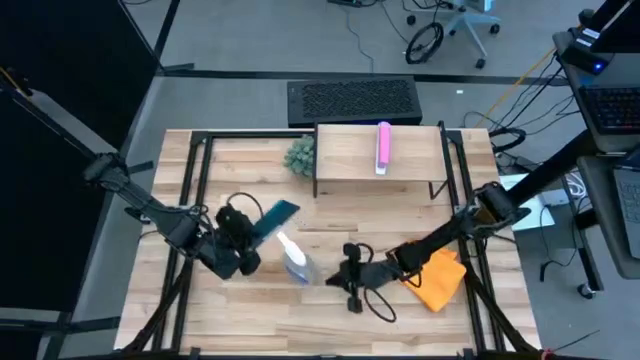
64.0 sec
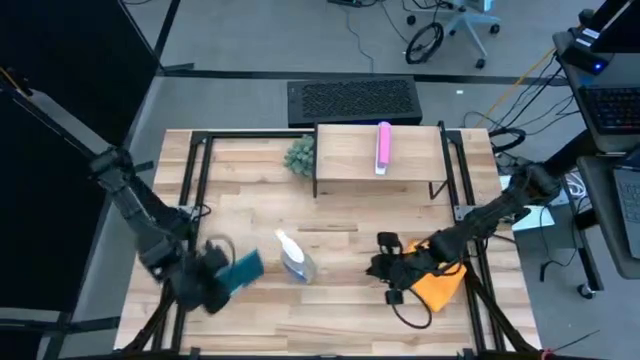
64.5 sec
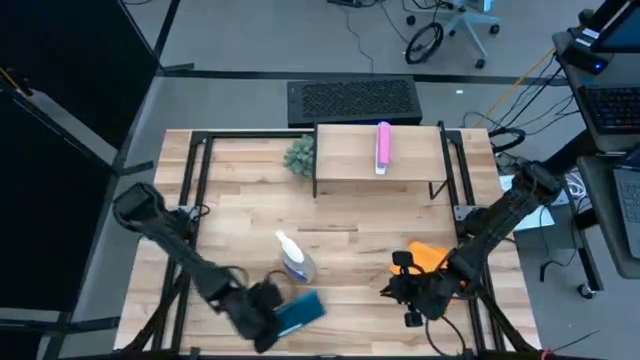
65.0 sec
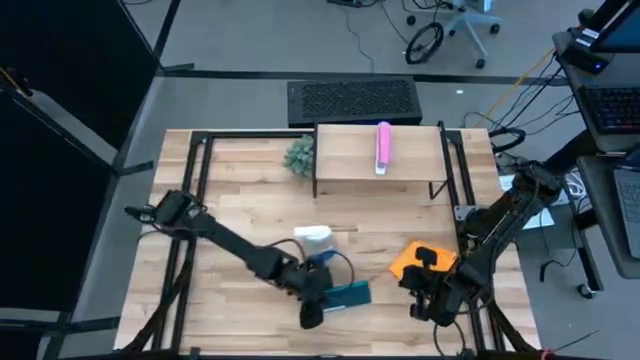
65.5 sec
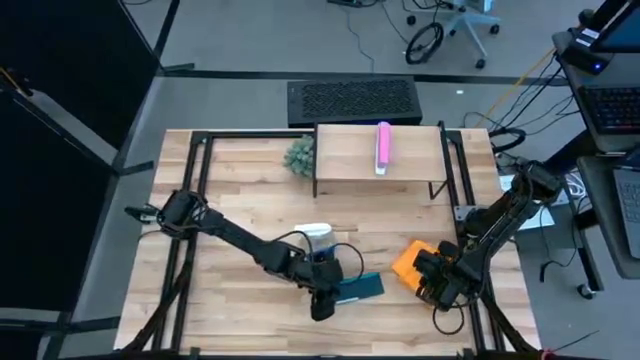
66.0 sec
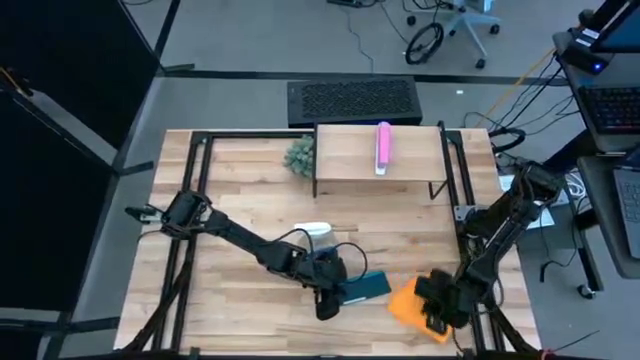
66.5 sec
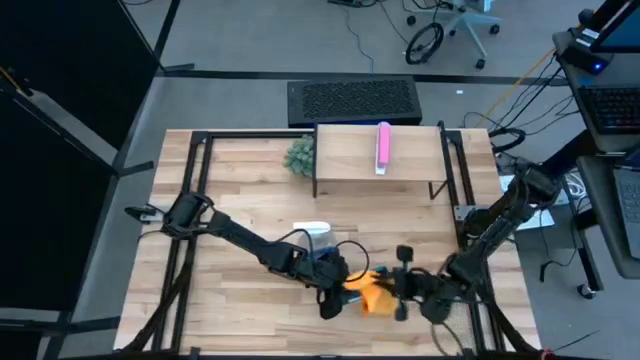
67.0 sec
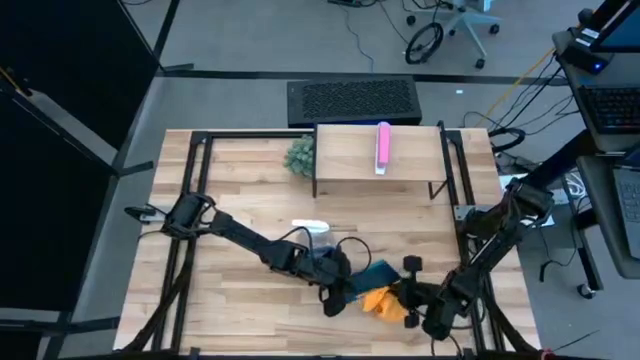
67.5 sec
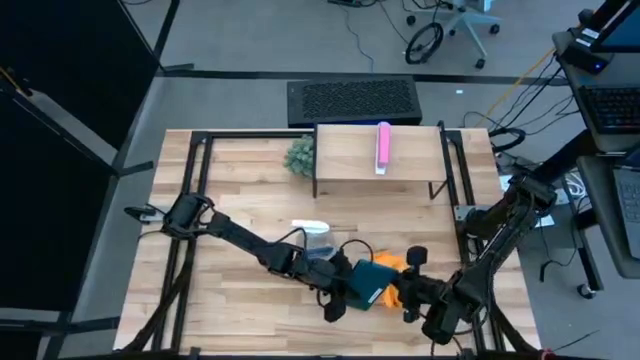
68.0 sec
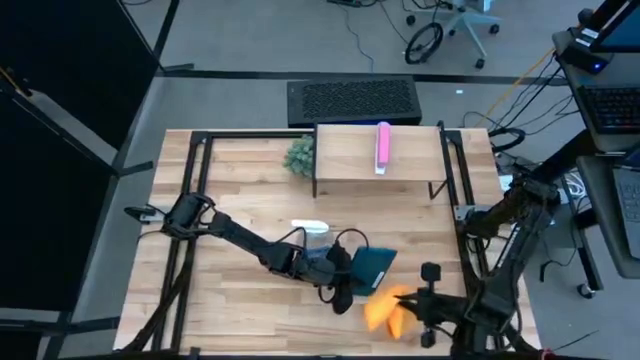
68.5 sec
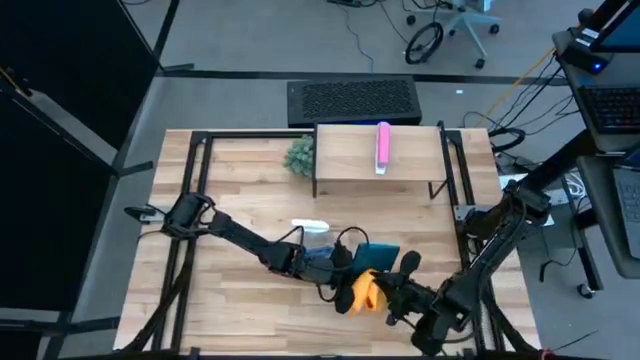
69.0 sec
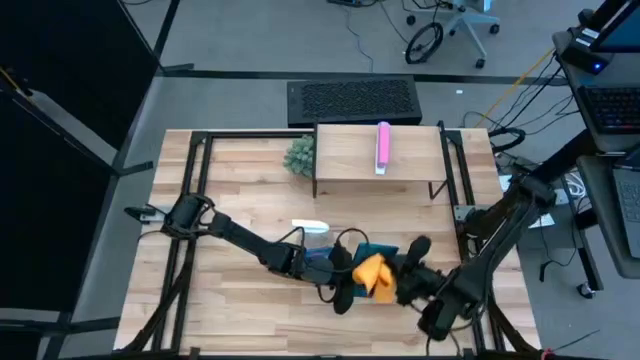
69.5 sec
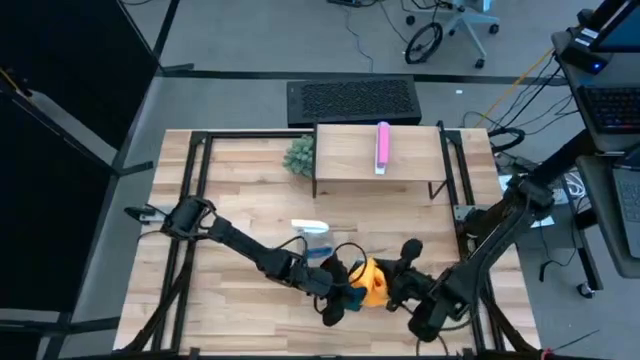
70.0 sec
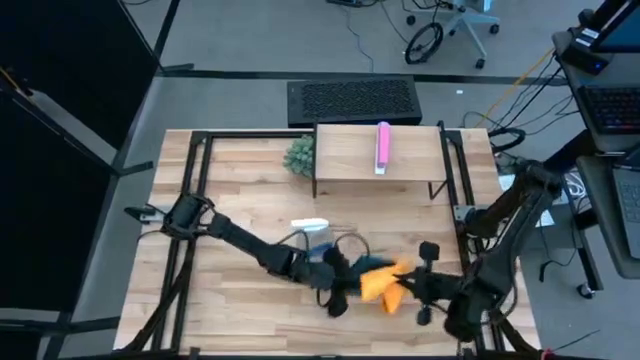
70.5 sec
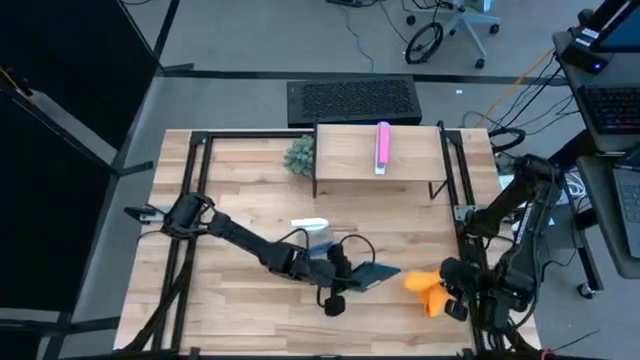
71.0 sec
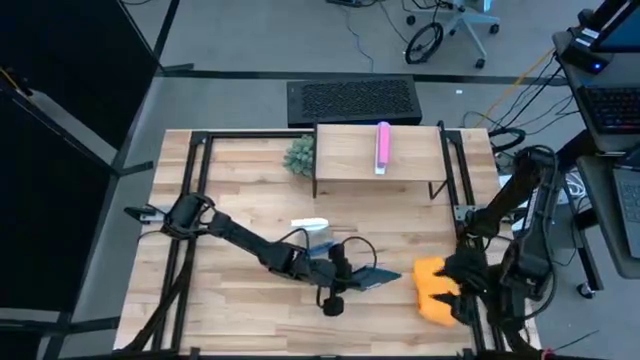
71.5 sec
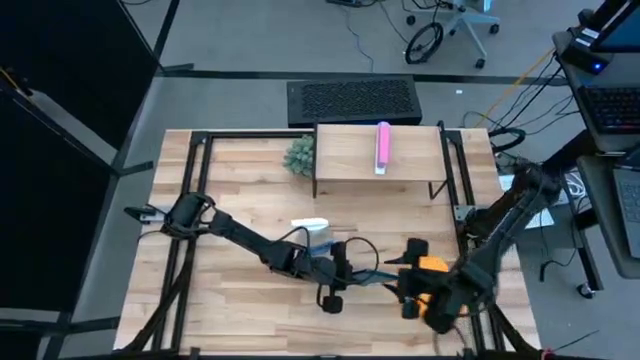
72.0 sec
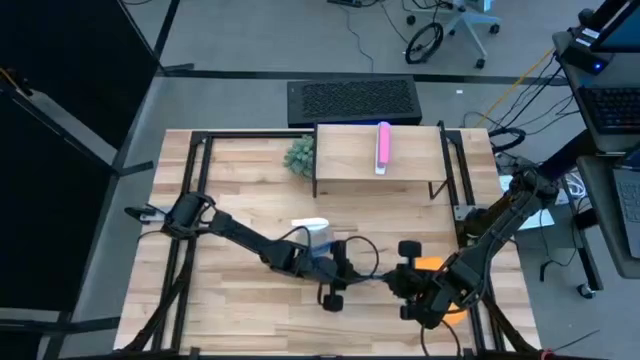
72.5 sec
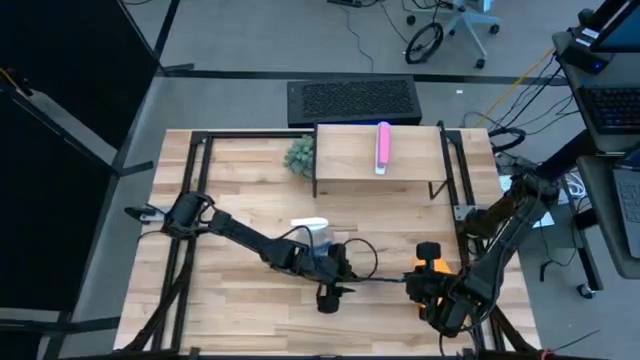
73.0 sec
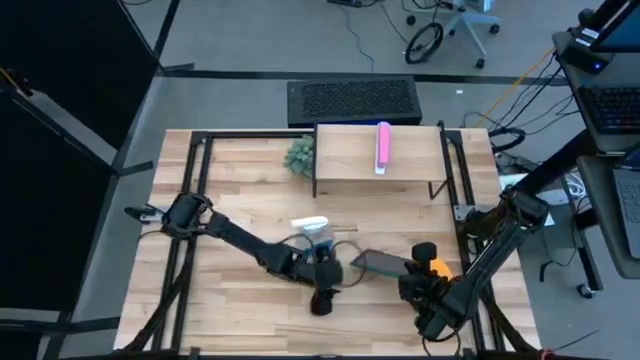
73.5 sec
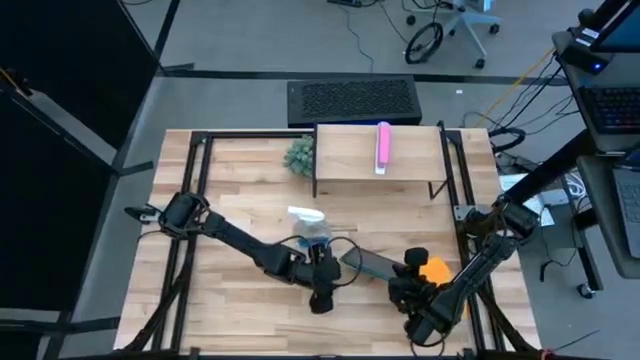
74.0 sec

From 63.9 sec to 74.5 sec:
Task: Apply microfiber cloth
Wipe the tablet with the microfiber cloth

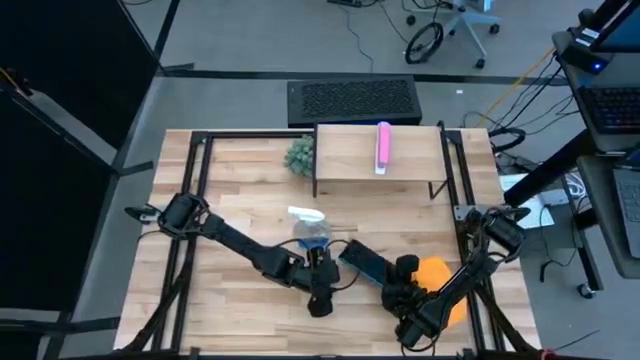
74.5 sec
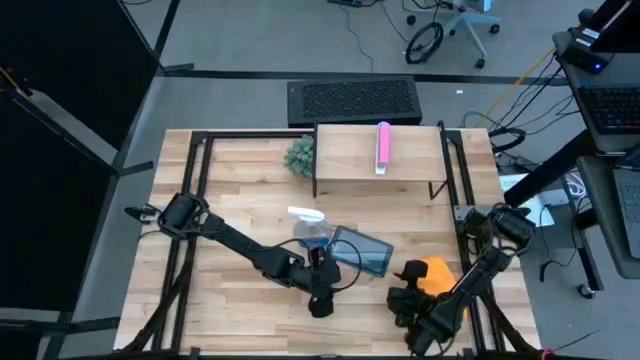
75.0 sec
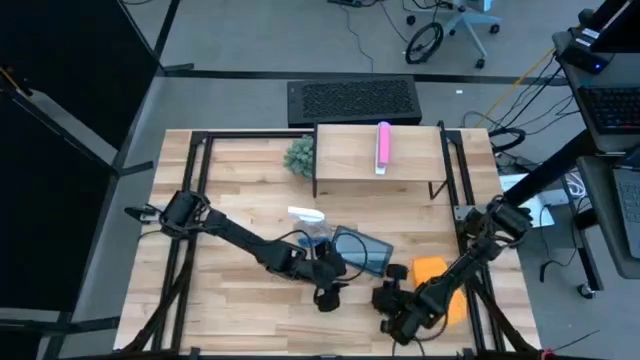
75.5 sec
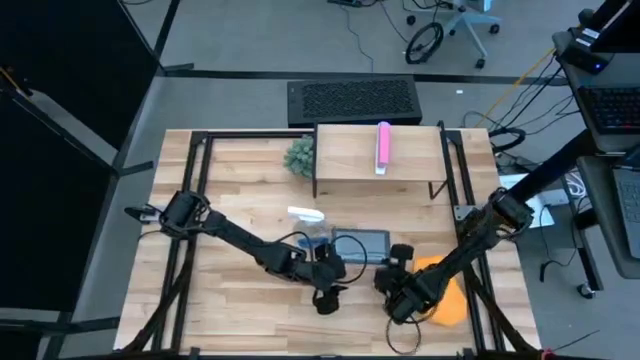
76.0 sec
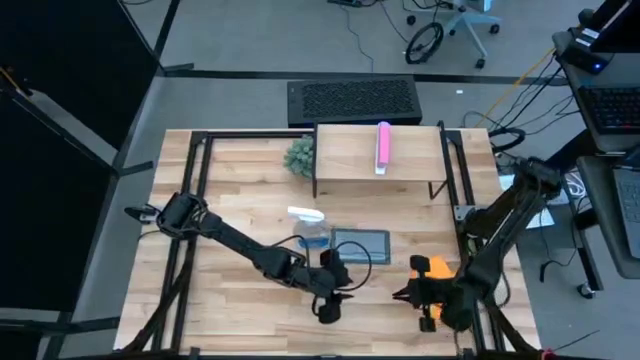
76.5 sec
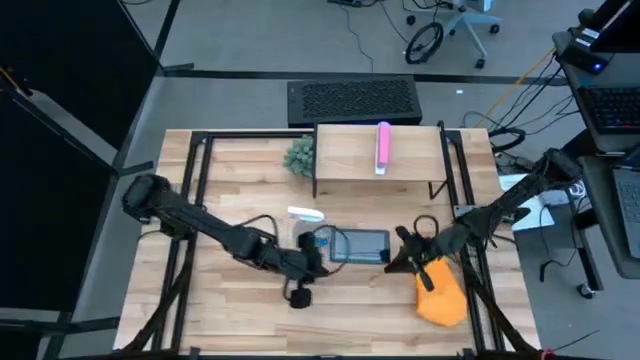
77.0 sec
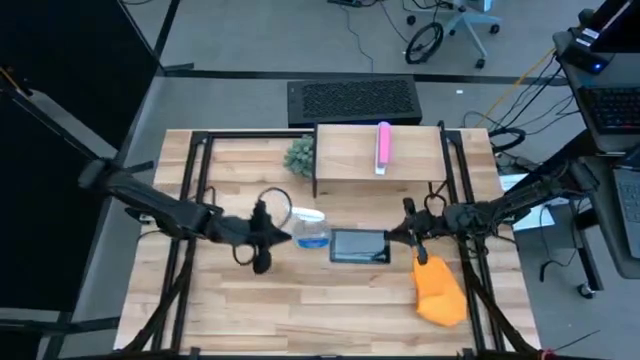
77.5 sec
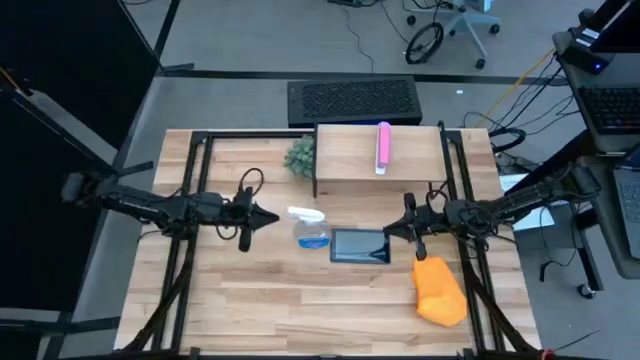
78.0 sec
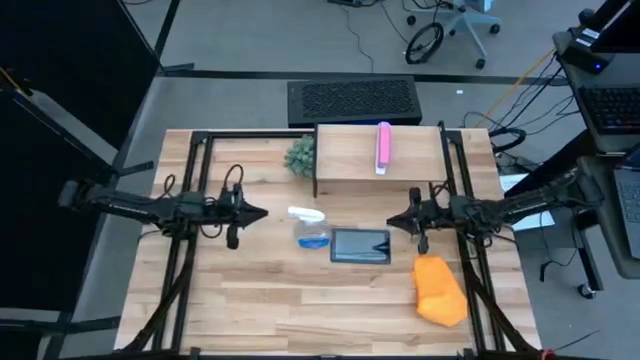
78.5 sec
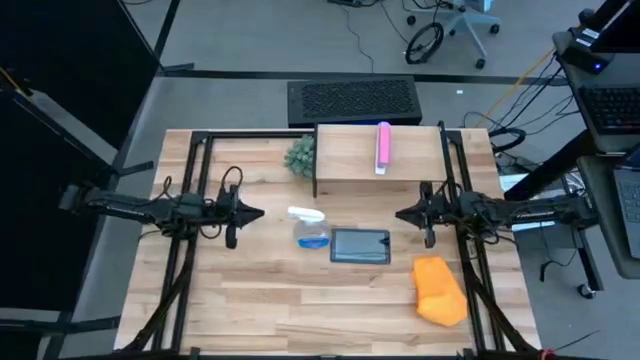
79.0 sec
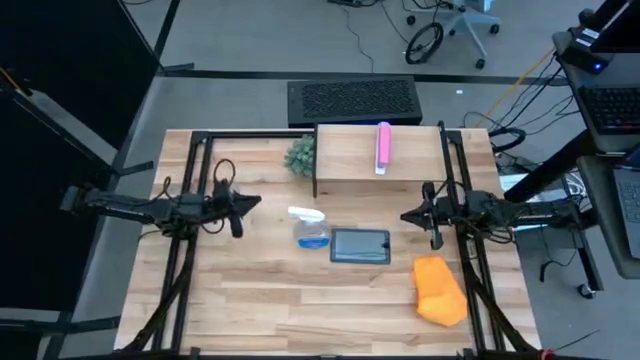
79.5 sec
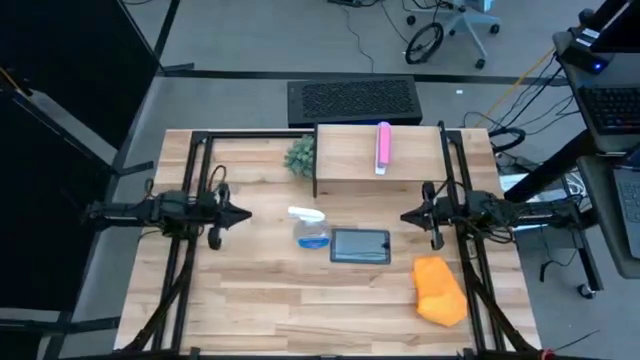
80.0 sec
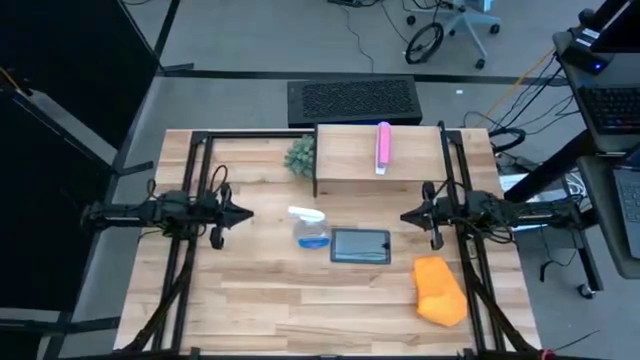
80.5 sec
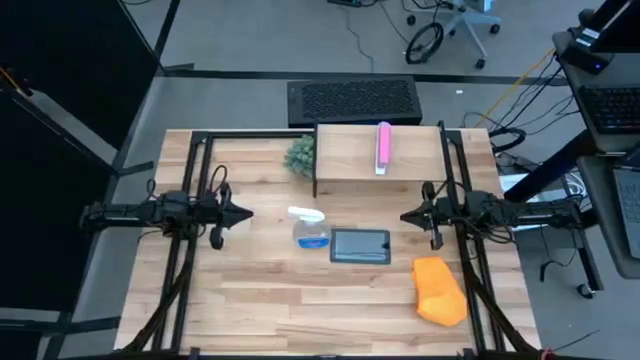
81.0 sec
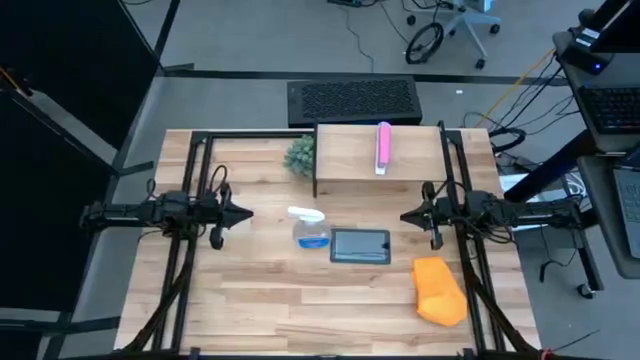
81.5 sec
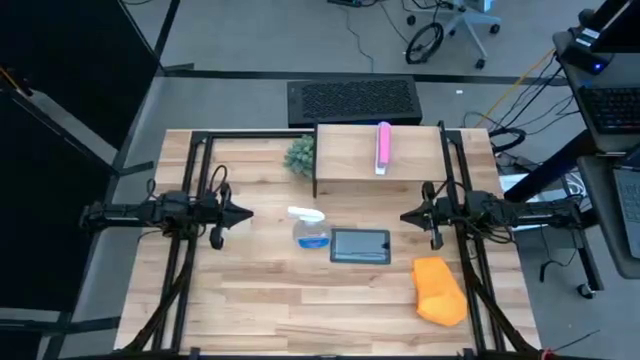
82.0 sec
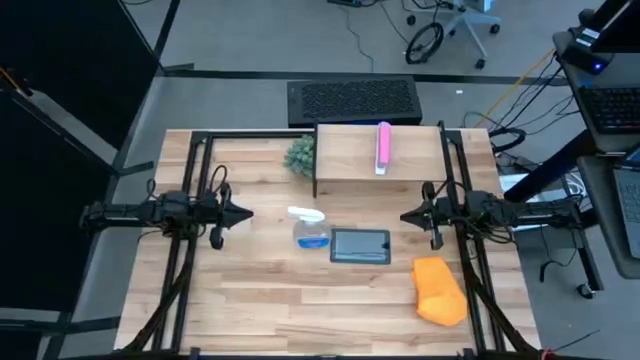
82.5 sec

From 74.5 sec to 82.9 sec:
Return to Home Position

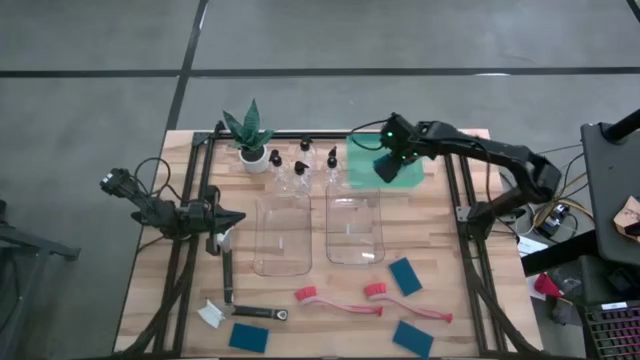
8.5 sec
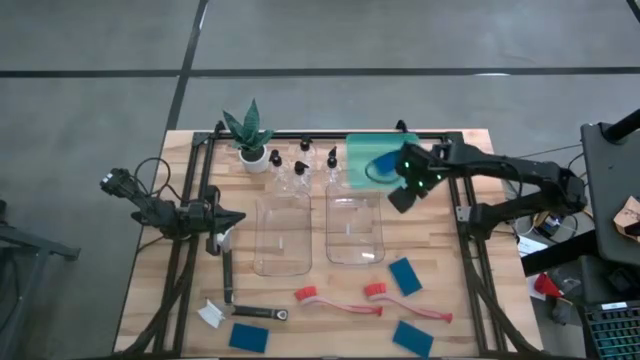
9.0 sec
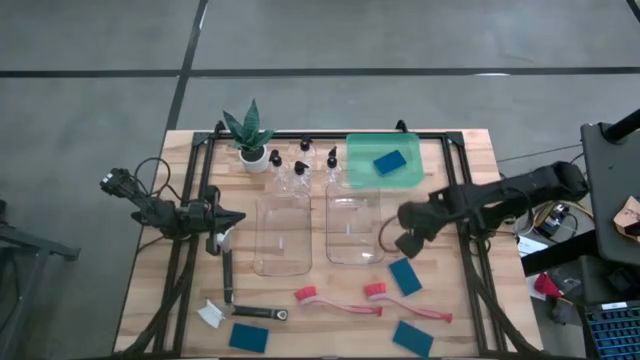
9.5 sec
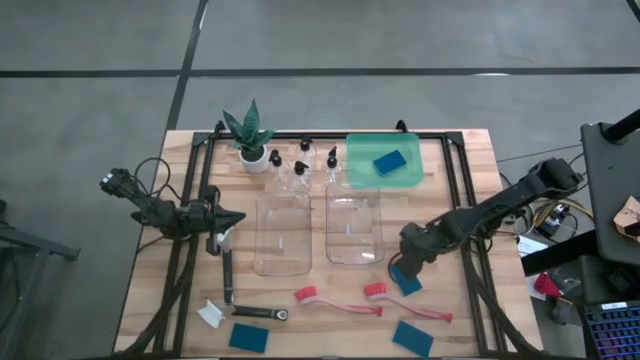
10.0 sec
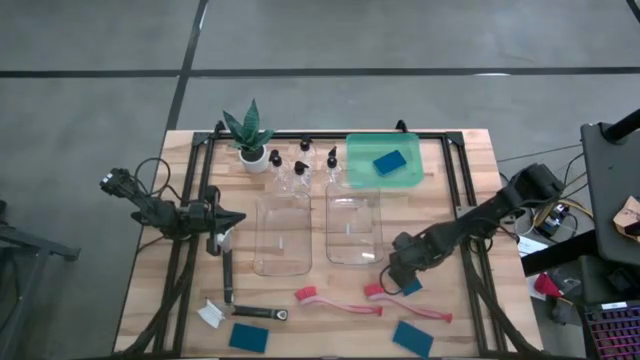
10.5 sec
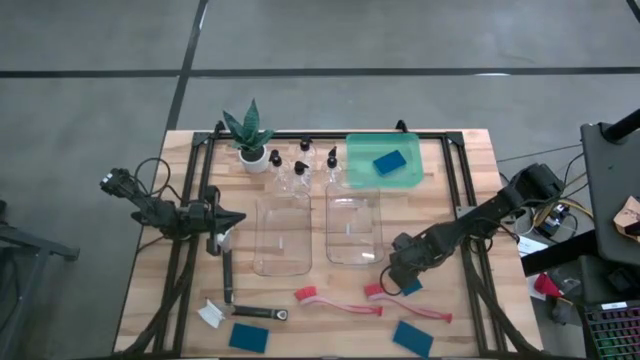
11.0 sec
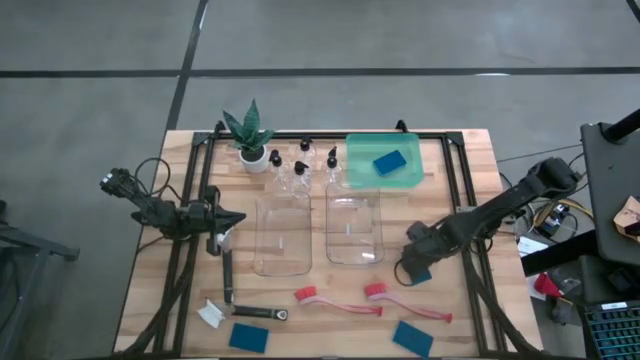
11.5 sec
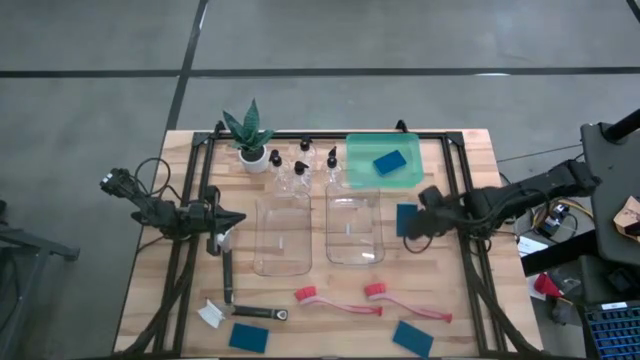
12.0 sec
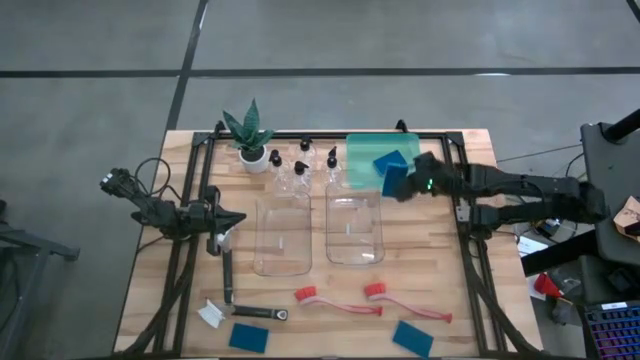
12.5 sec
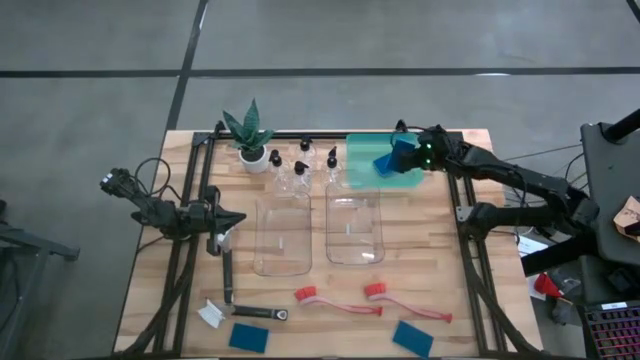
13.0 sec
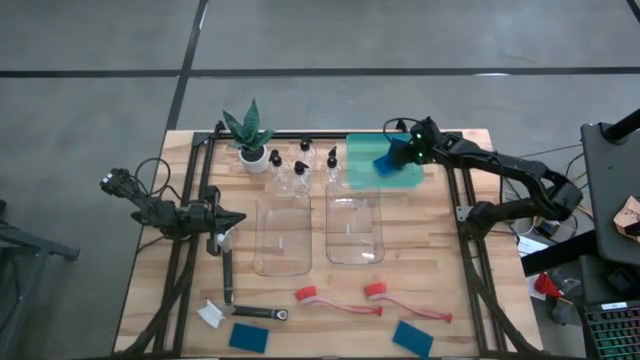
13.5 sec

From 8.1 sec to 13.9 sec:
Task: Pick & Place Kitchen Sink Supplies
Put the blue sponge into the green bin
